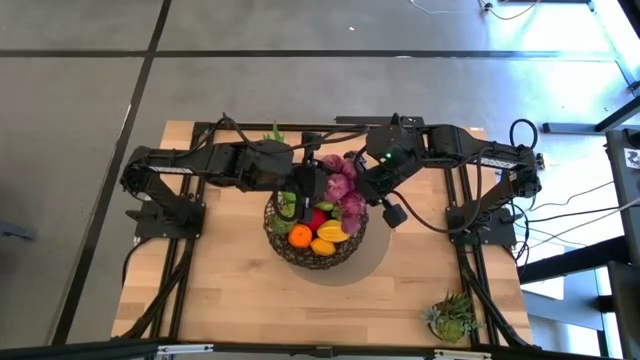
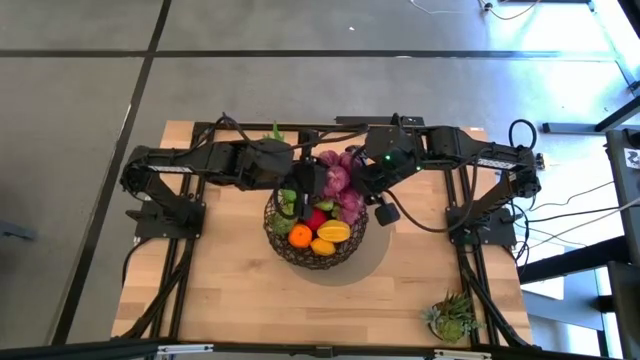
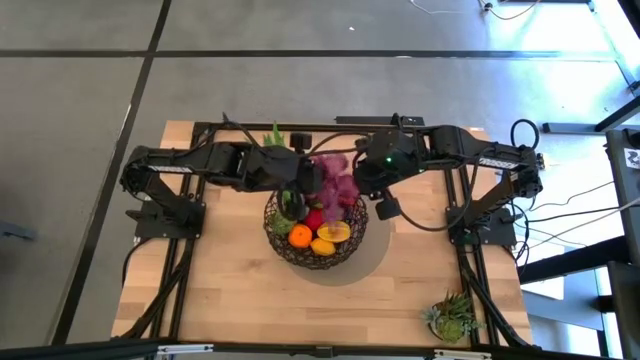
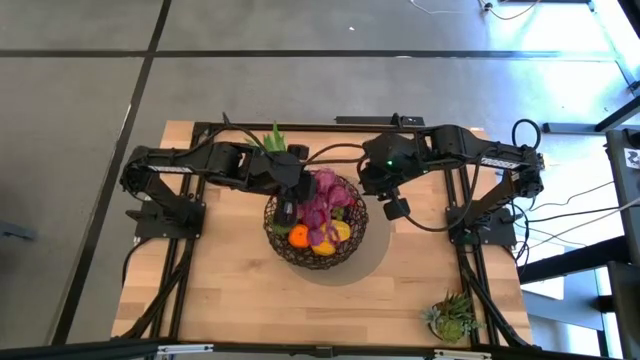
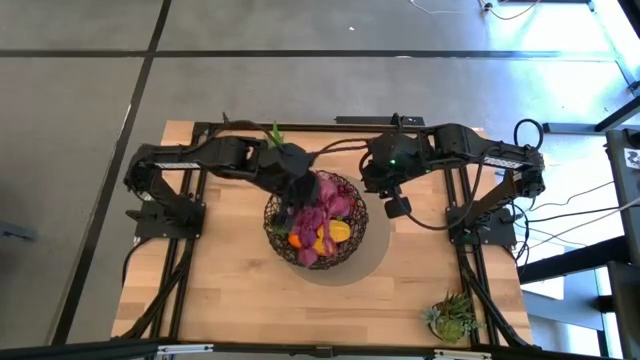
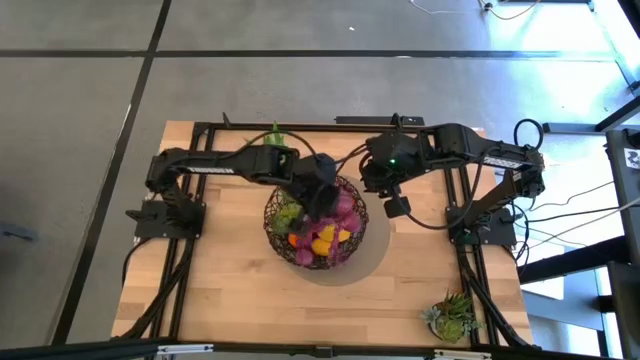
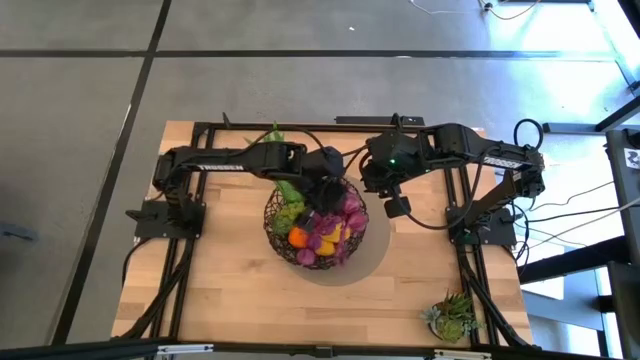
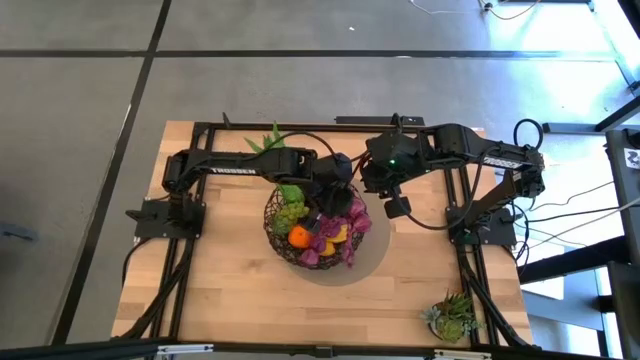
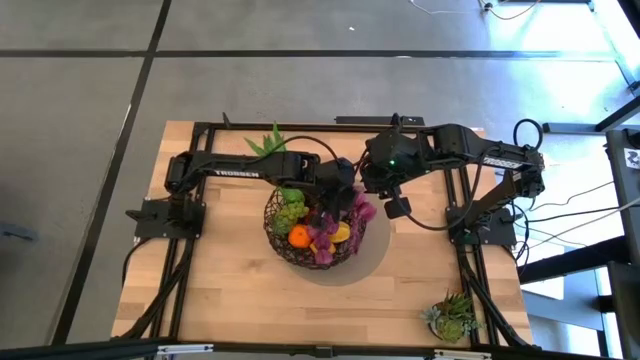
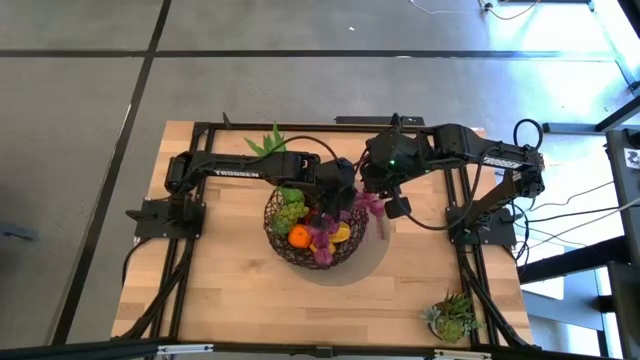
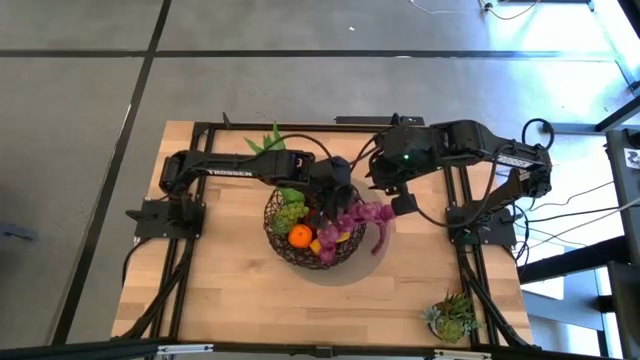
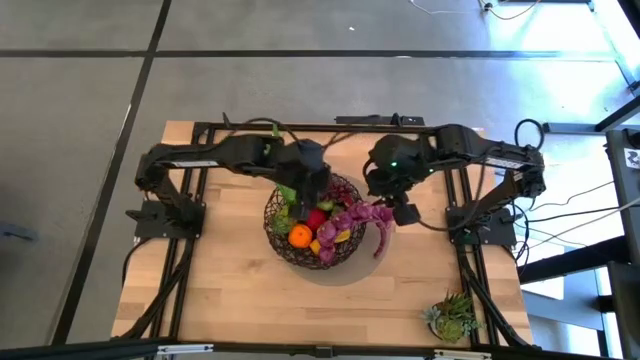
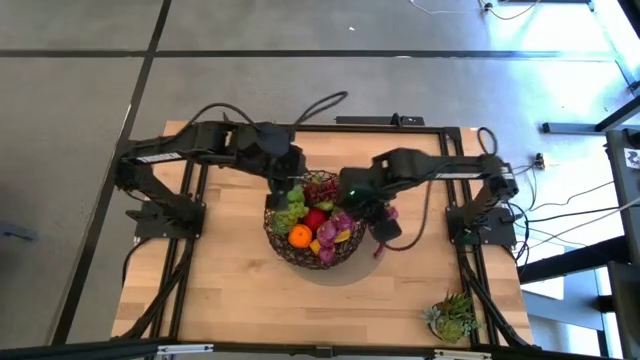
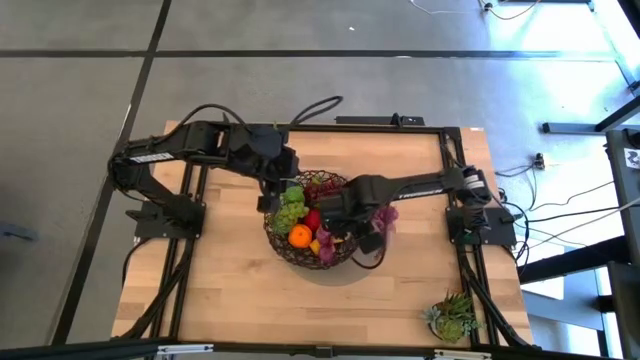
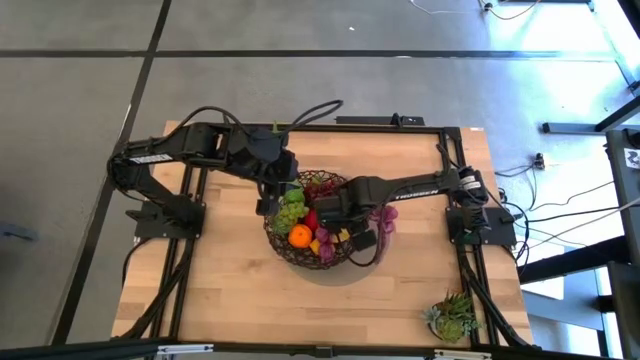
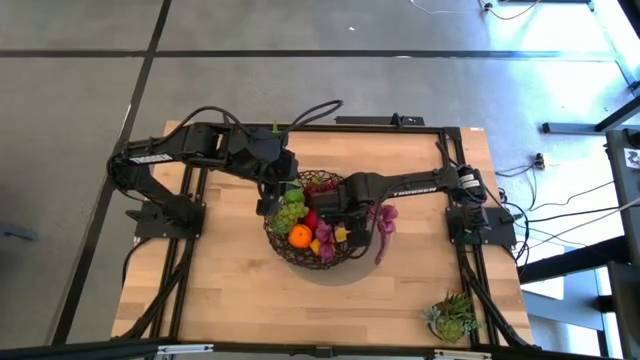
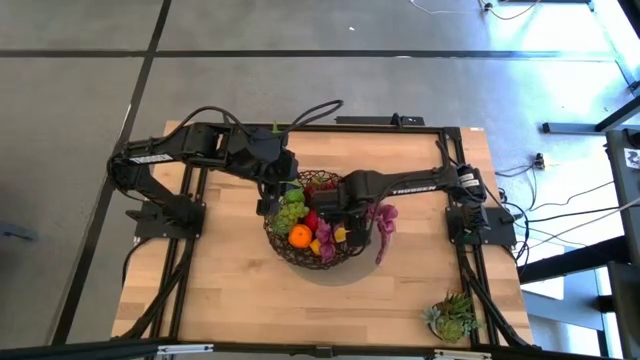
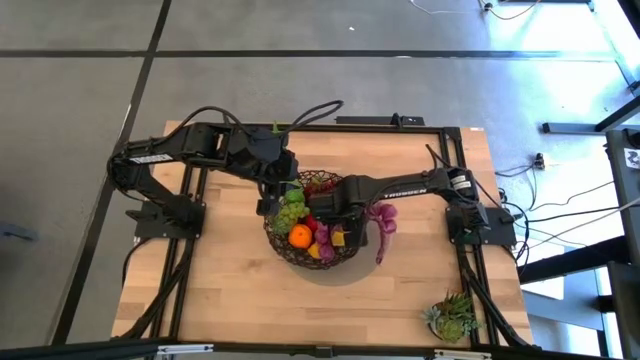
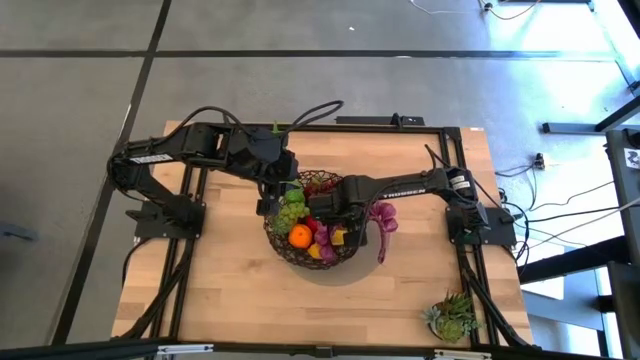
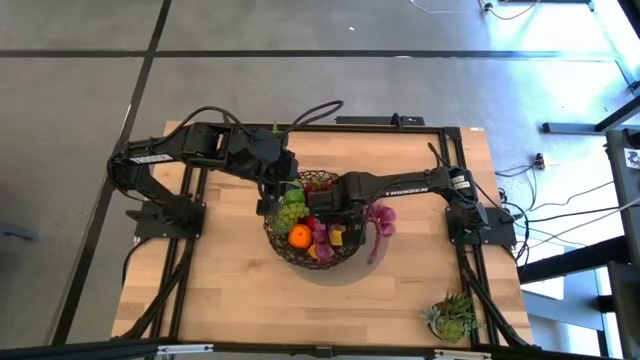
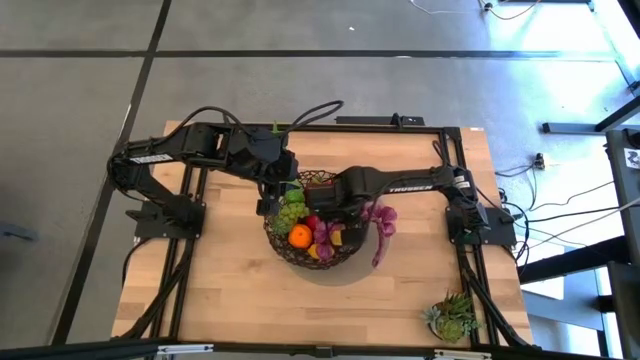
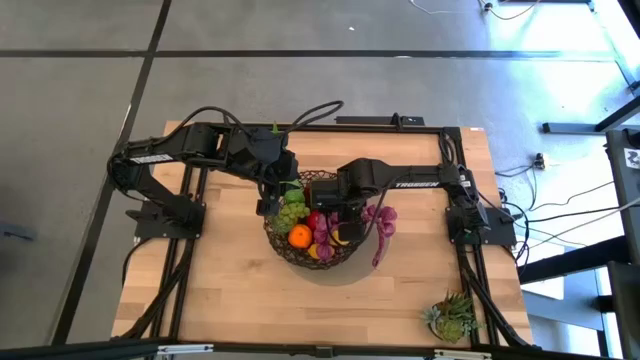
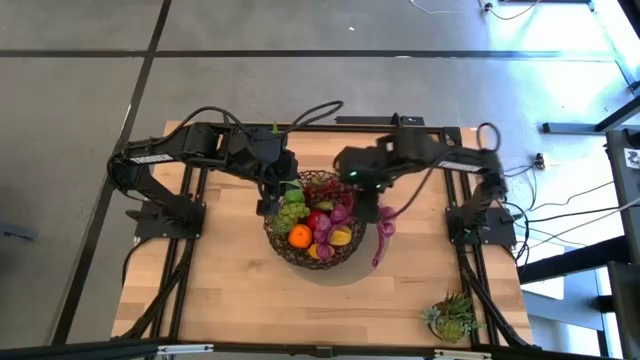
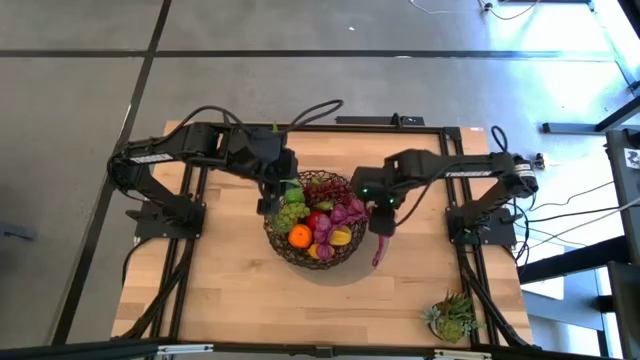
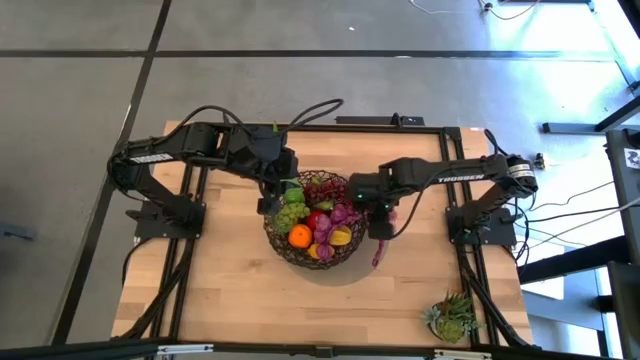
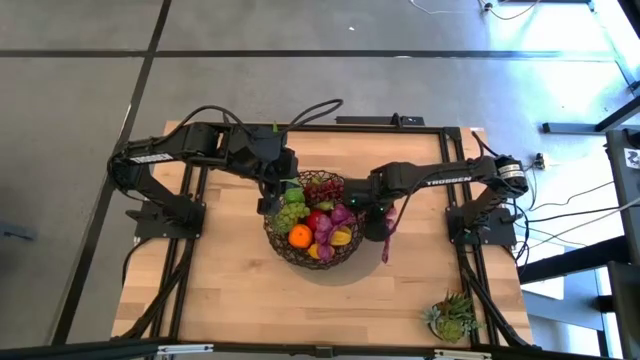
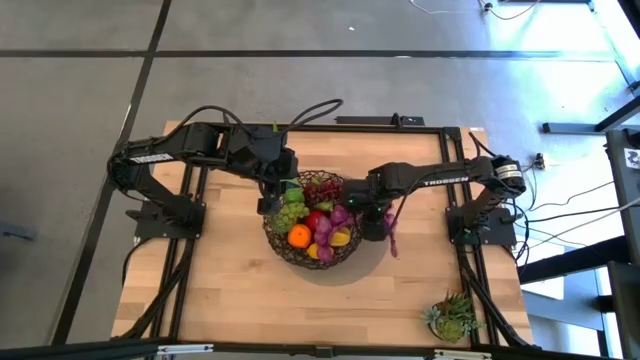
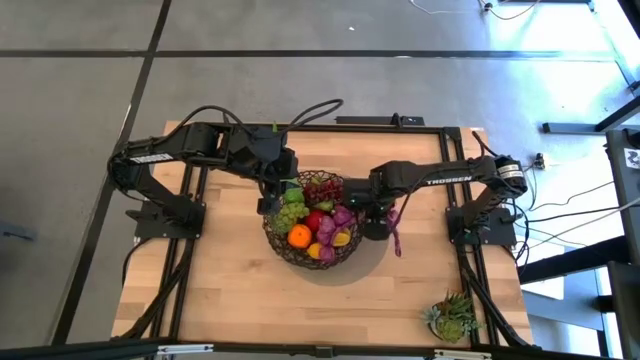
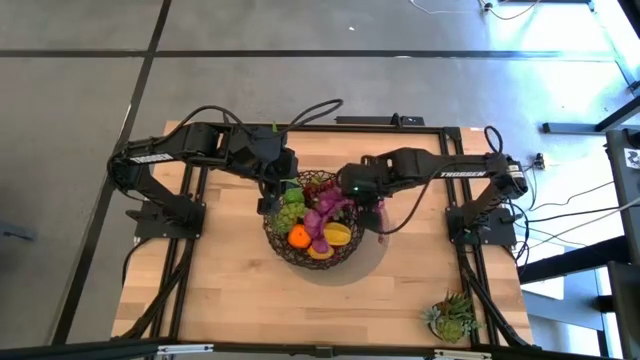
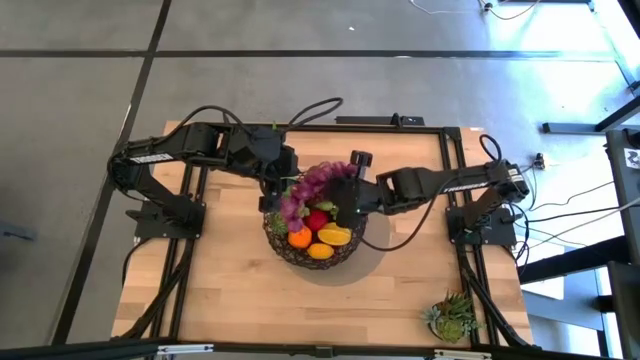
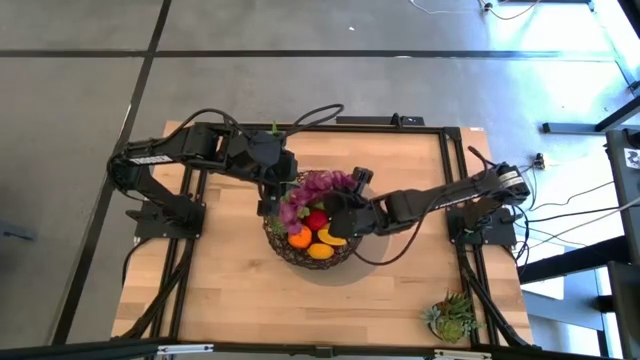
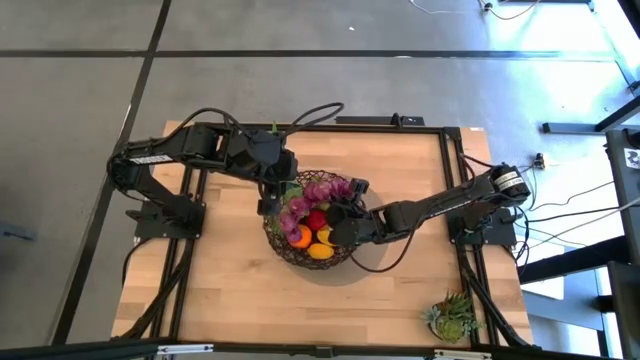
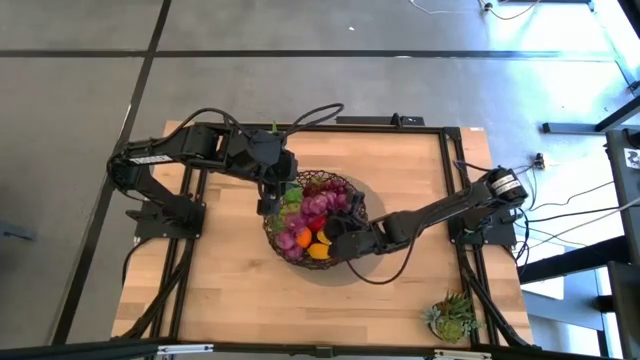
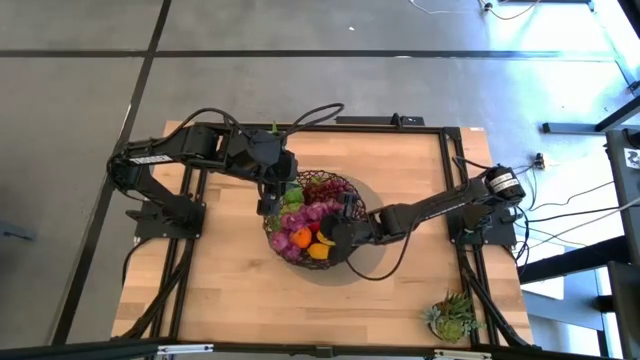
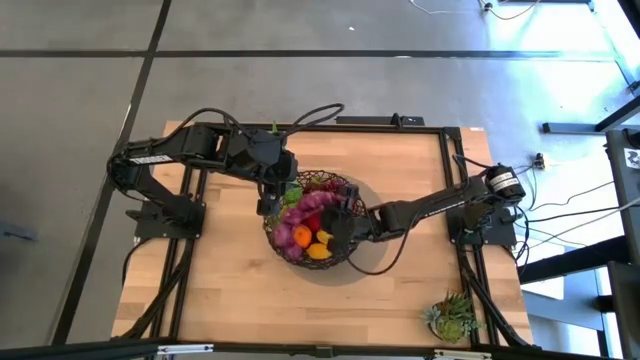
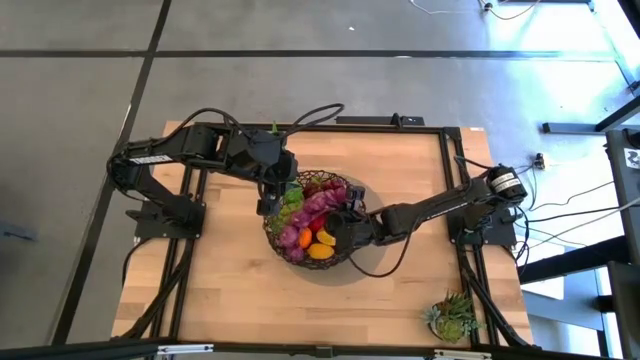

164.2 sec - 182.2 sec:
Task: Build produce basket
Put the purple garlic into the wire basket

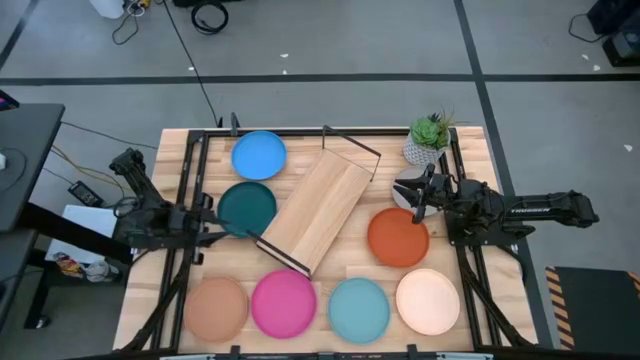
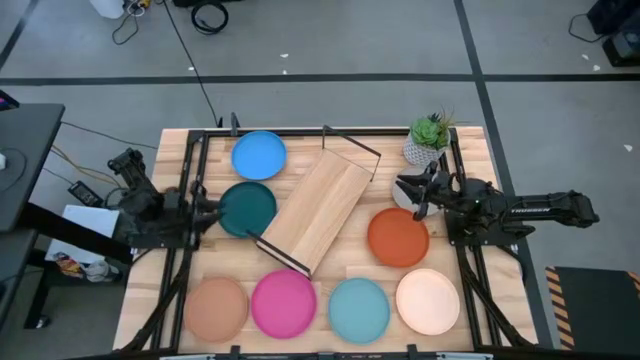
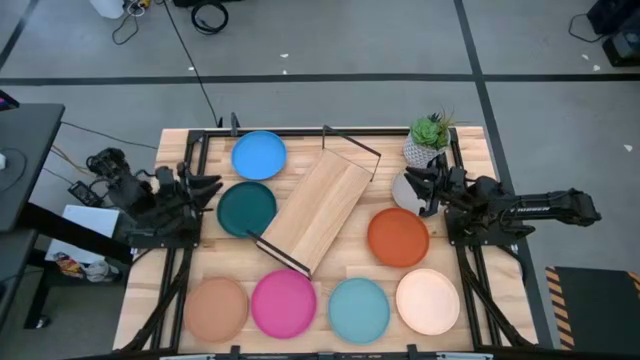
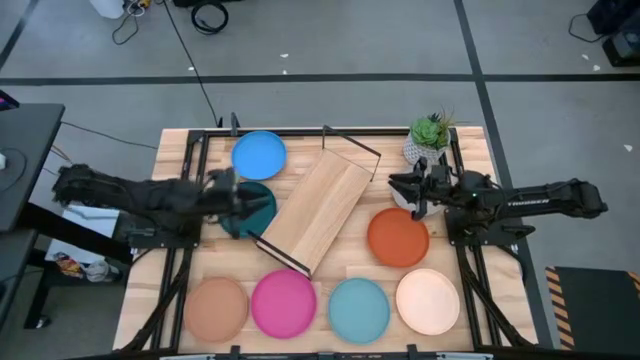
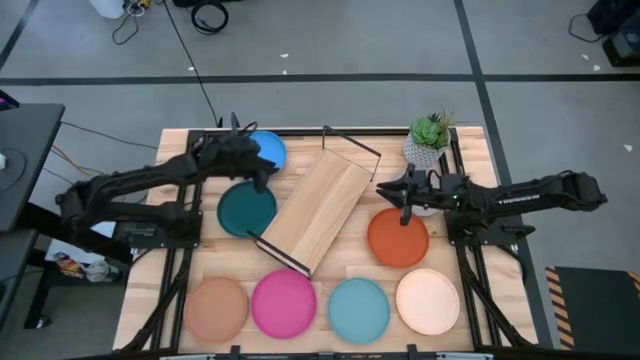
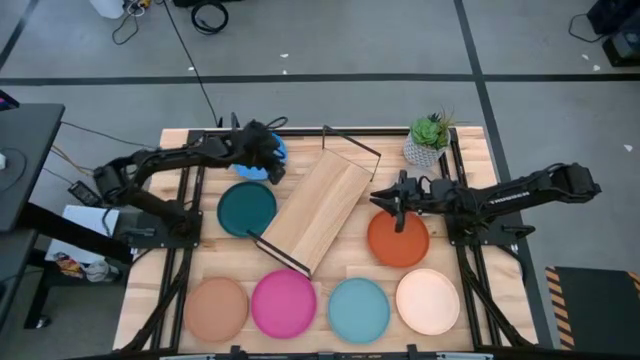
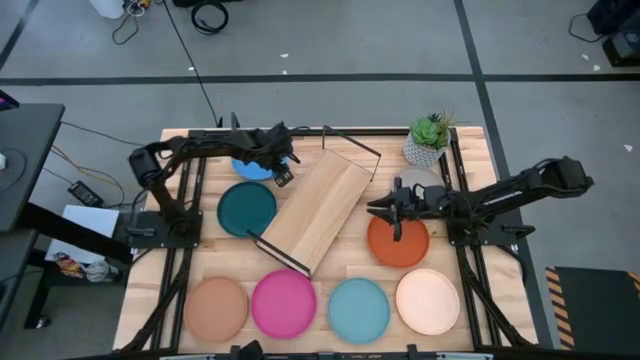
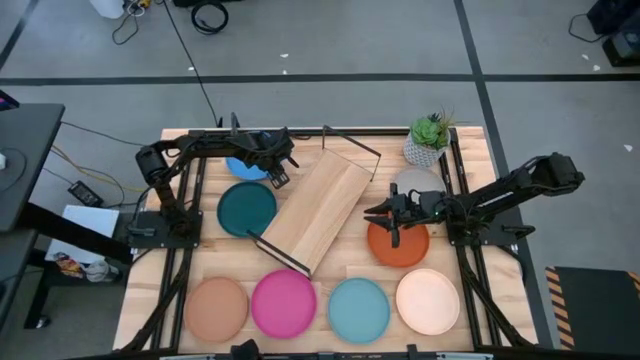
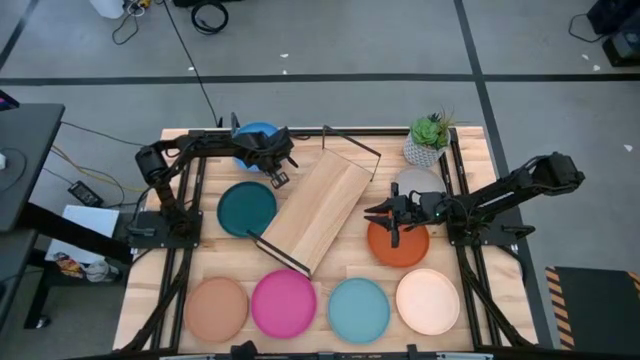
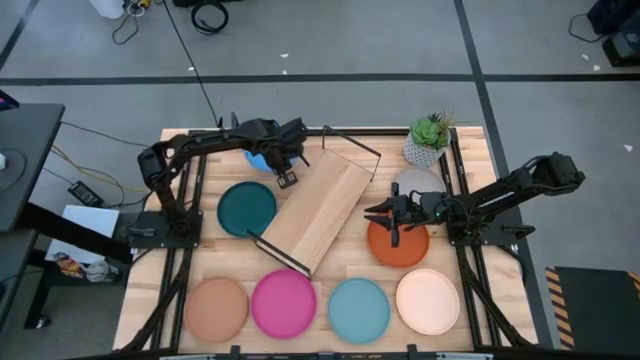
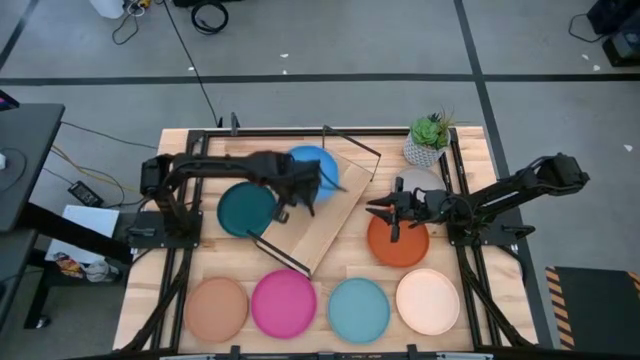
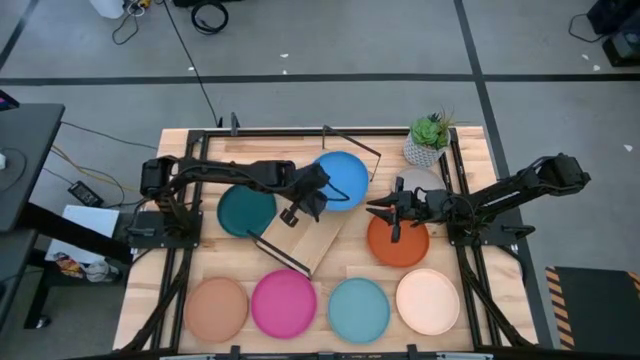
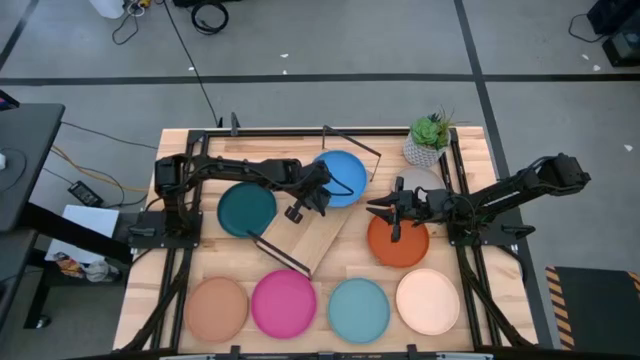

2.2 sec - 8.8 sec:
Task: Place and stack plates onto a shelf
Put the blue plate on the shelf
